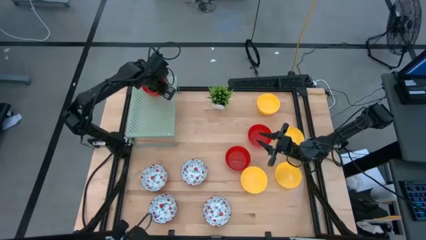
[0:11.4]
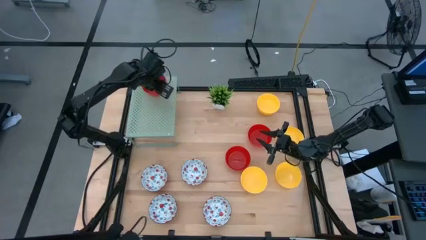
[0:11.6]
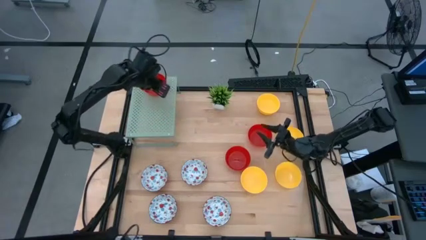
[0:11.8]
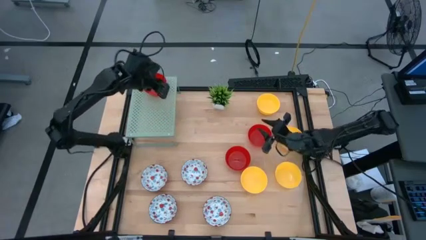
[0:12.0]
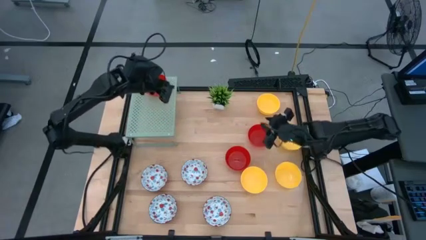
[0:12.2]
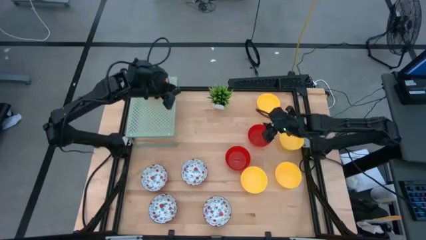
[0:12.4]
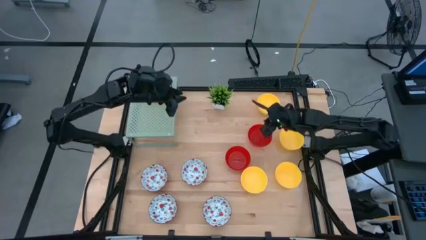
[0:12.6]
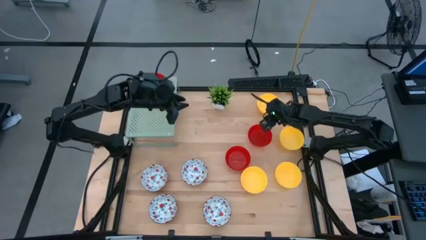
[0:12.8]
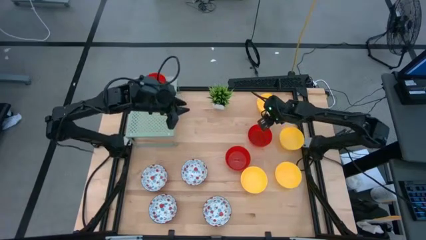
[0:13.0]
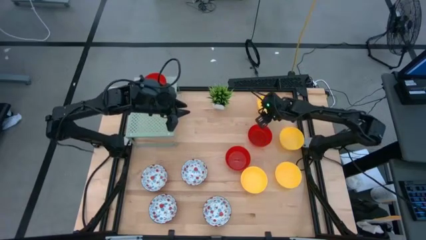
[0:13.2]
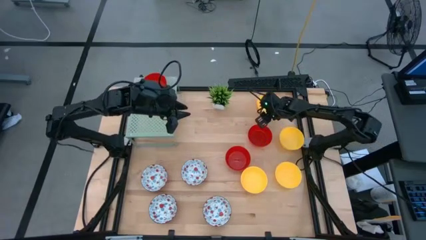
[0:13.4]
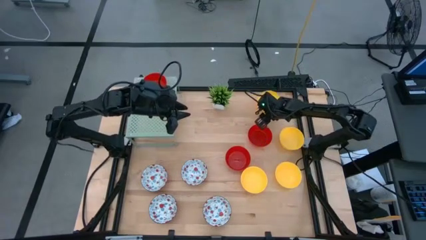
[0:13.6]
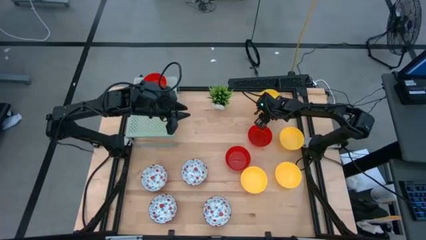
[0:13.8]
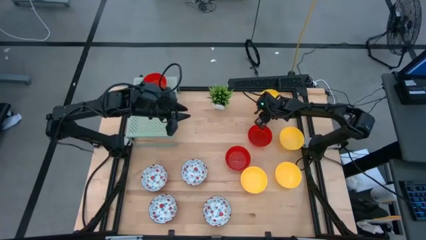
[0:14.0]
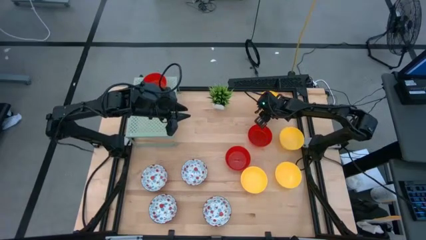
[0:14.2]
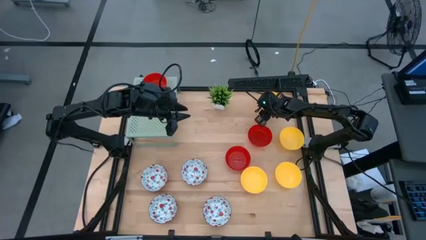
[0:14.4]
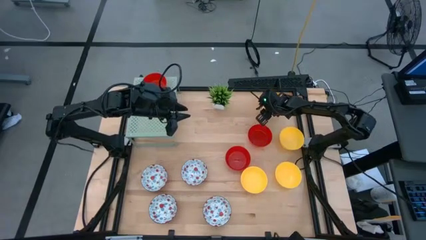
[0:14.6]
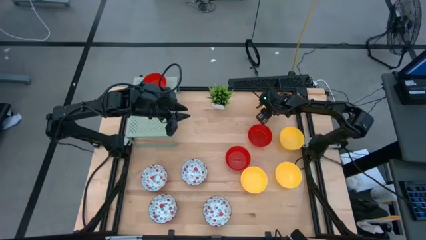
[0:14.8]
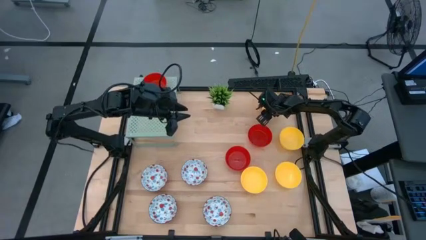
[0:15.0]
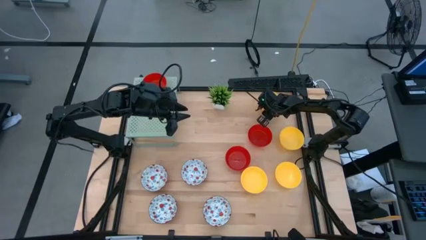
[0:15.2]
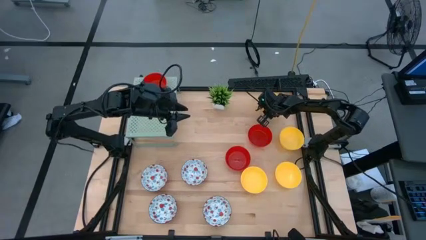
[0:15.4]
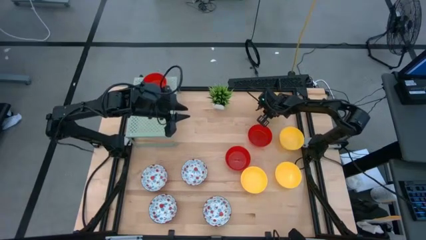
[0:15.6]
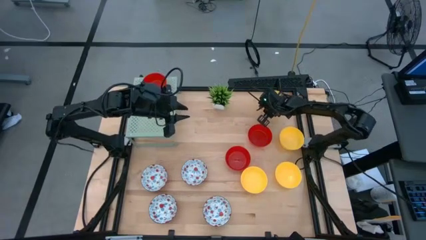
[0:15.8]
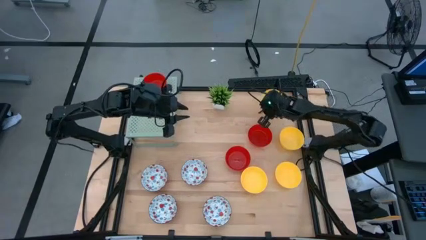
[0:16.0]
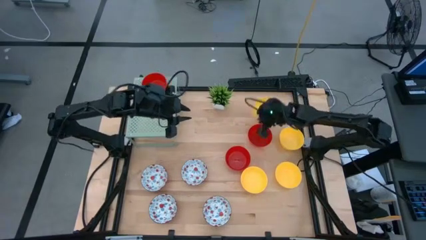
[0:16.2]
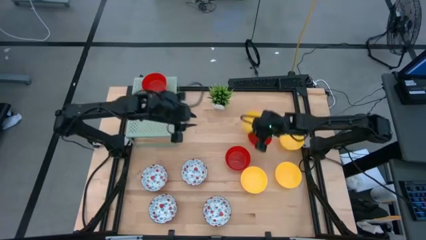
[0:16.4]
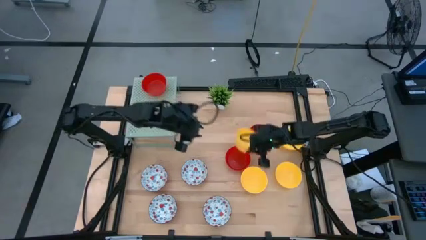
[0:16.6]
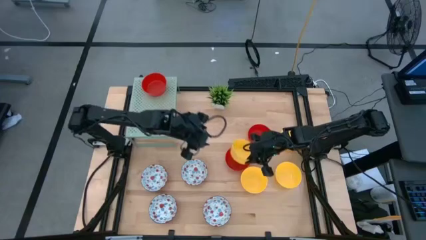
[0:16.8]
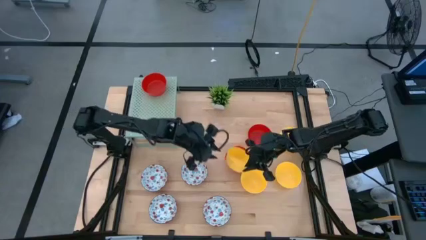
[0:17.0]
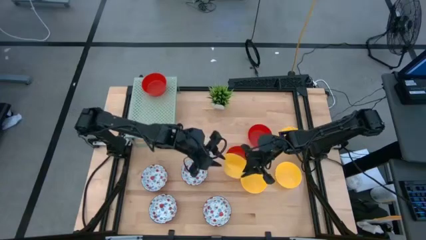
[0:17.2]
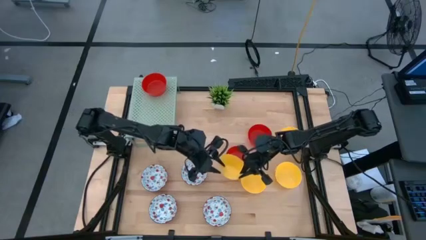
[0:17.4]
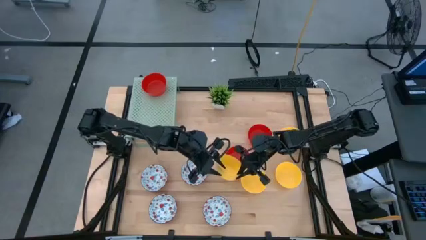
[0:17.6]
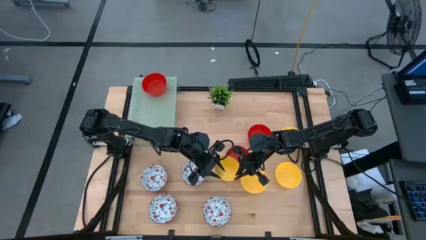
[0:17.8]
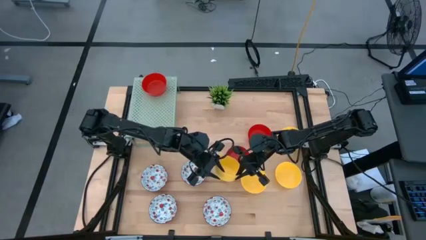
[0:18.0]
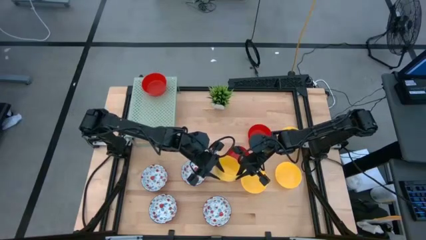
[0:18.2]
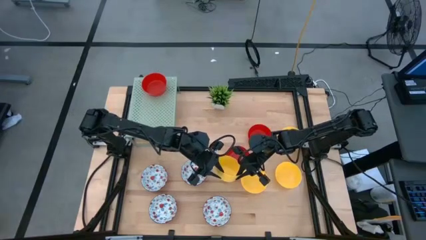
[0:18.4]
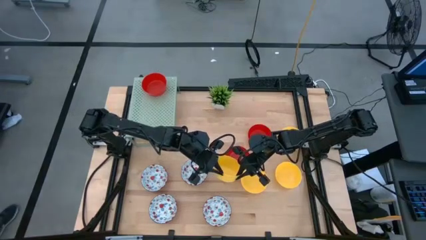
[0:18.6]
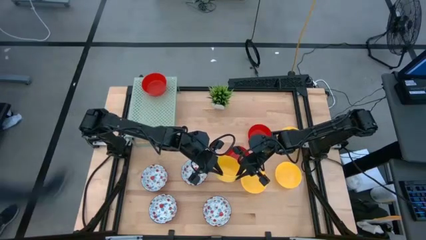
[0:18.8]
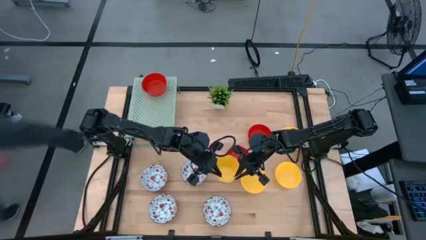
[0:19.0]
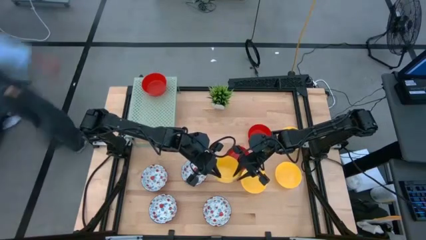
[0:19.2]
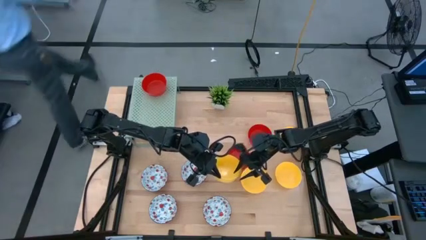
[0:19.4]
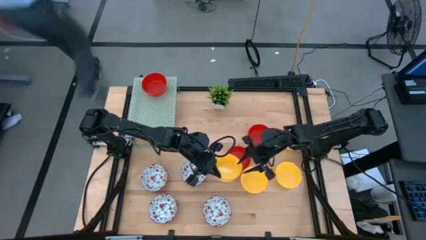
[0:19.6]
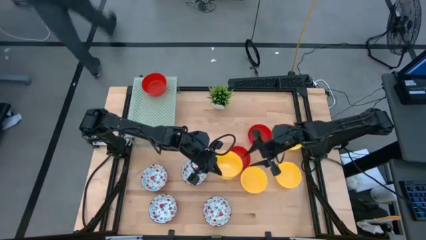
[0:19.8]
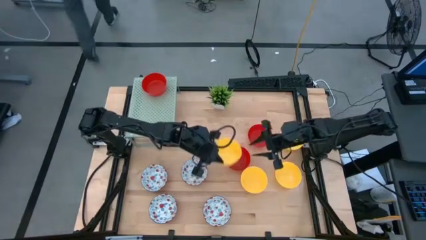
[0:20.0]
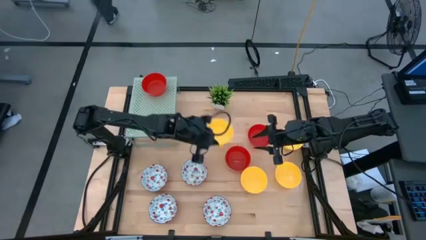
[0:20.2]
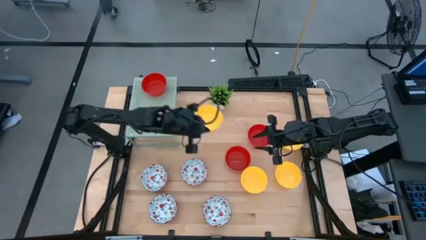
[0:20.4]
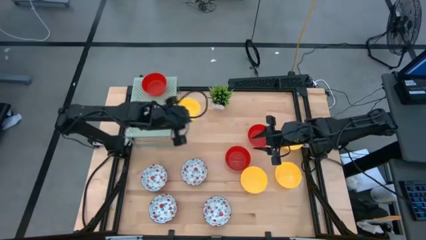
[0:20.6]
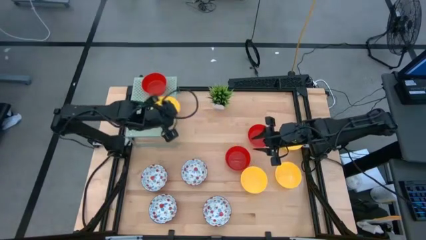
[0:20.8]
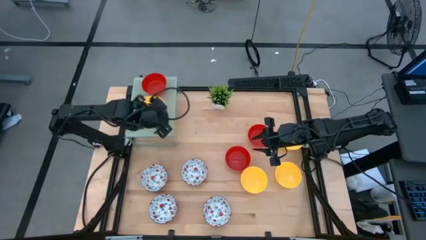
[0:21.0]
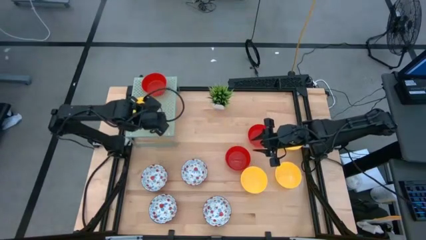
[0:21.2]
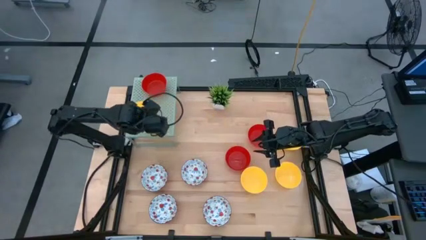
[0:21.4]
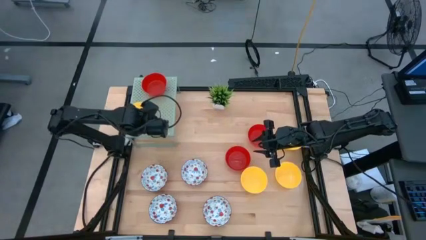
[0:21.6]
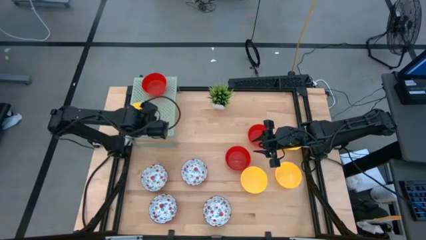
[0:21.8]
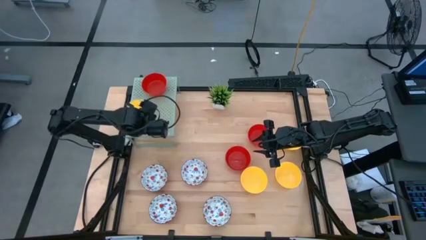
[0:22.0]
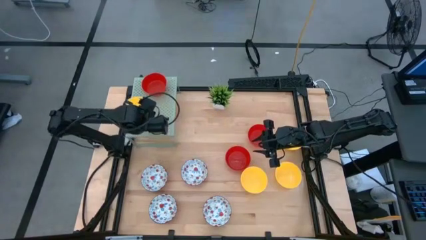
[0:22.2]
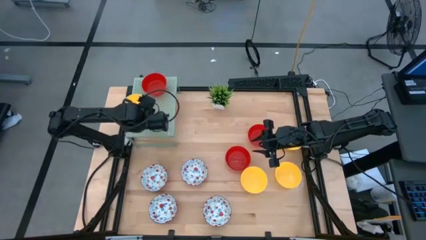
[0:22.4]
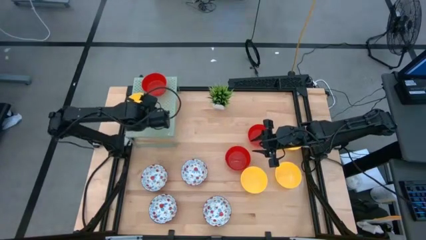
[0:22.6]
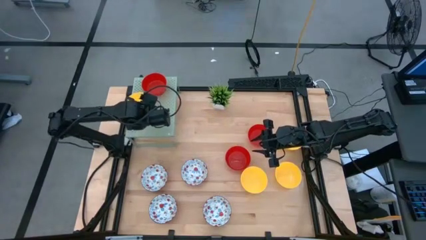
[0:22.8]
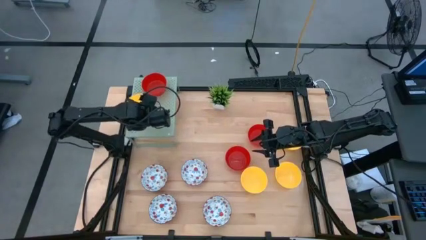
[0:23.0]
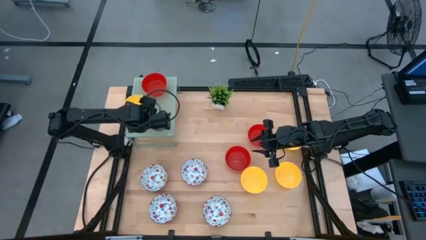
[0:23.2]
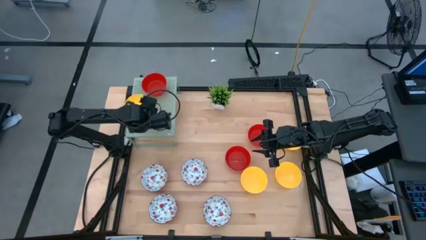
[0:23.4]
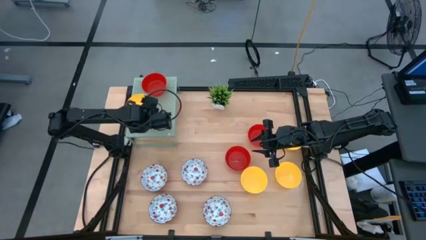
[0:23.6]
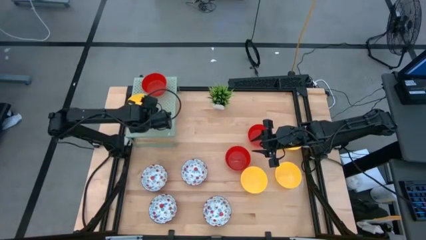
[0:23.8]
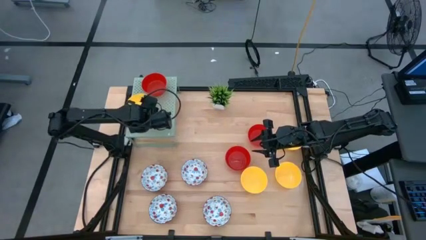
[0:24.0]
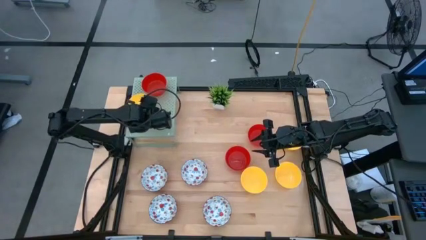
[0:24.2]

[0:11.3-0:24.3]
Task: Pick & Place Mini bowls
Put the yellow bowl on the shelf

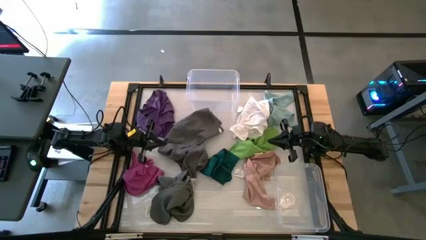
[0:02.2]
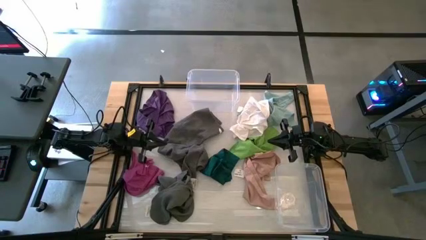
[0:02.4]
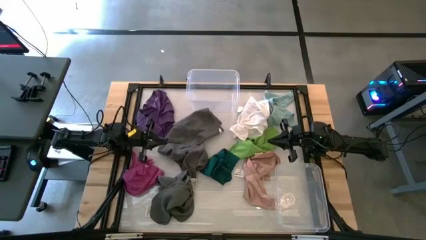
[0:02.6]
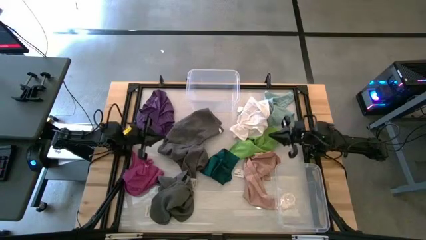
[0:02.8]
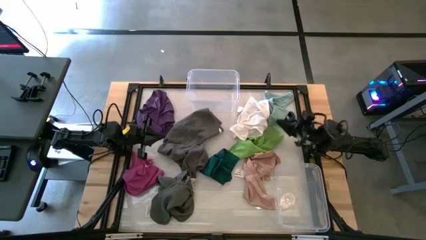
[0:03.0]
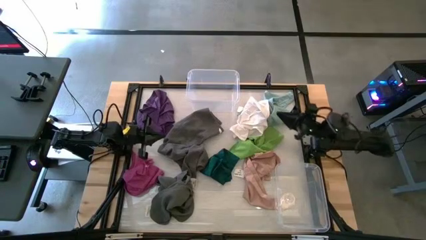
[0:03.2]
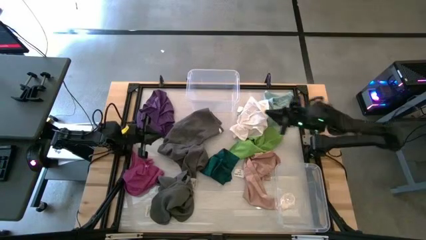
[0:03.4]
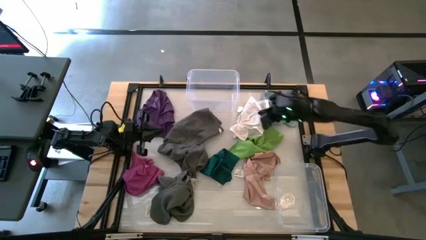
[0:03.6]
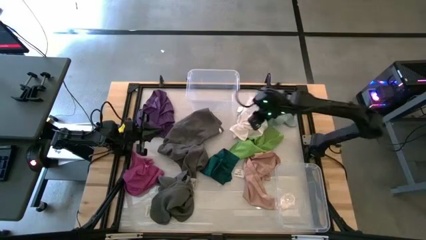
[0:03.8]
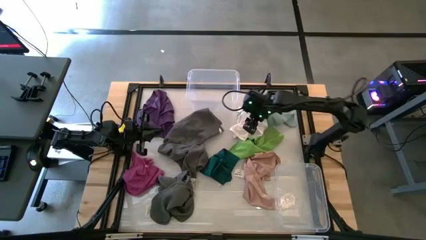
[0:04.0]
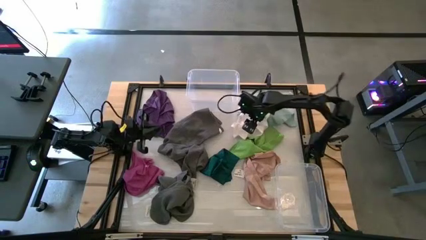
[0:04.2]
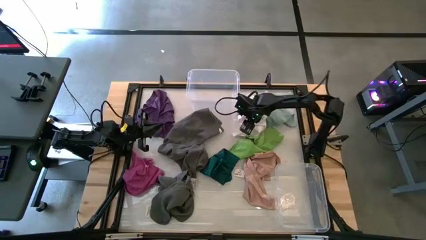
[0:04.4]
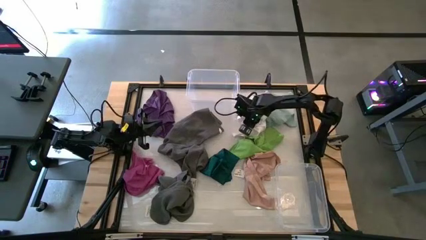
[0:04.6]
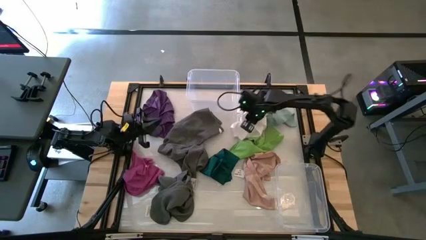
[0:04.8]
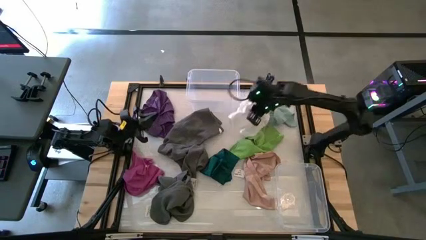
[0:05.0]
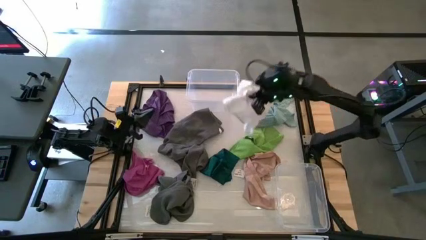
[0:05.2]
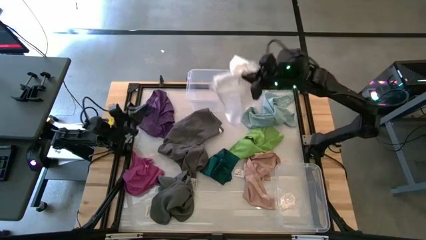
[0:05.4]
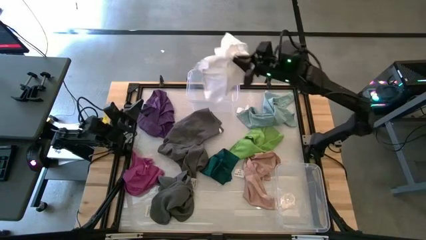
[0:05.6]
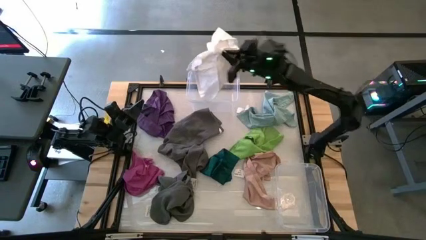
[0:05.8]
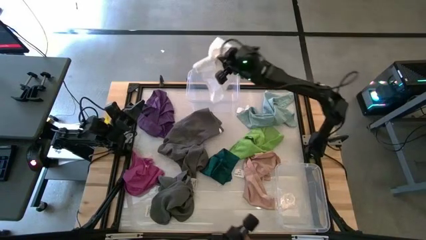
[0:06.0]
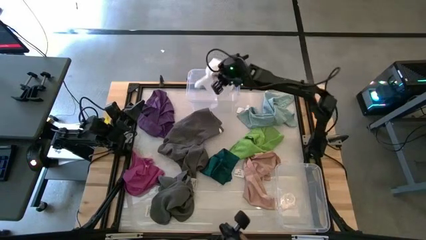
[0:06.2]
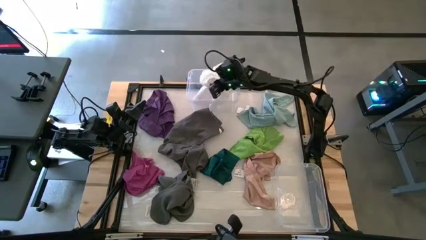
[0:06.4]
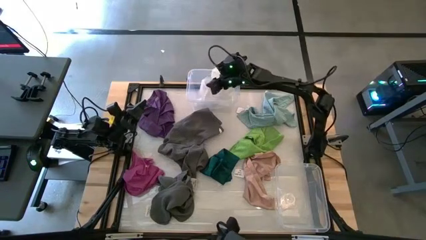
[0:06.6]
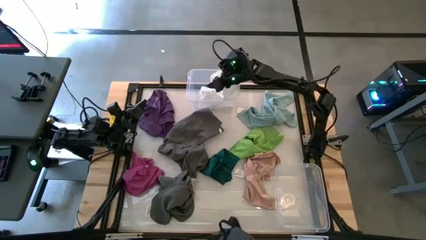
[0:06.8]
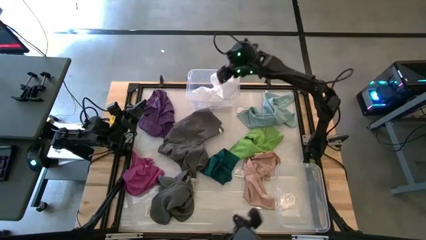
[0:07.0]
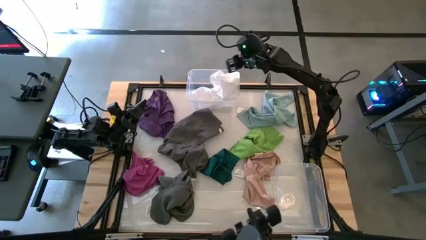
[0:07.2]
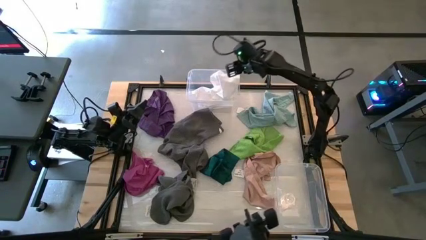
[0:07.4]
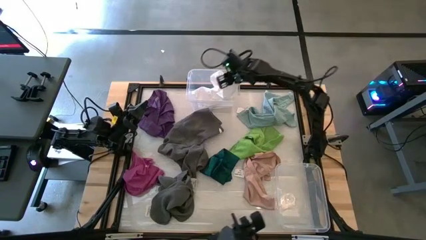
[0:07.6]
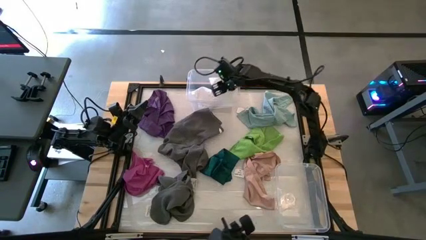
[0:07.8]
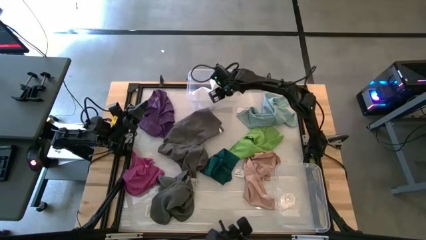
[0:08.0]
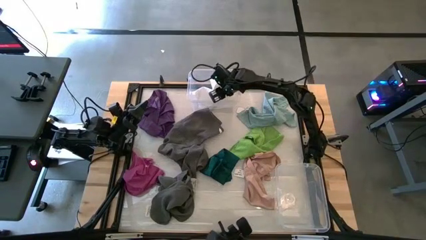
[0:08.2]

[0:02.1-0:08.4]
Task: Sort towels by color in basket
Put the white towel into the top transparent bin
